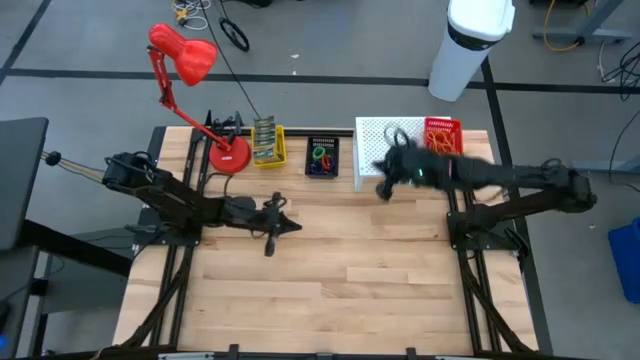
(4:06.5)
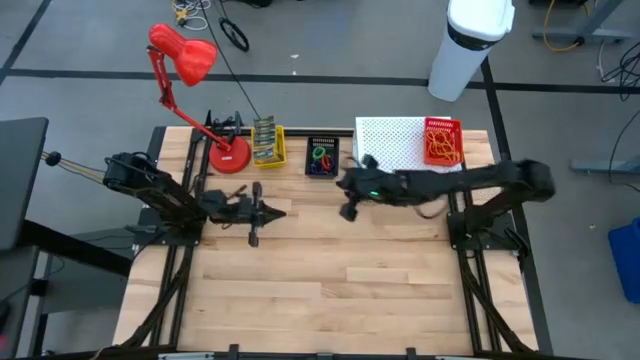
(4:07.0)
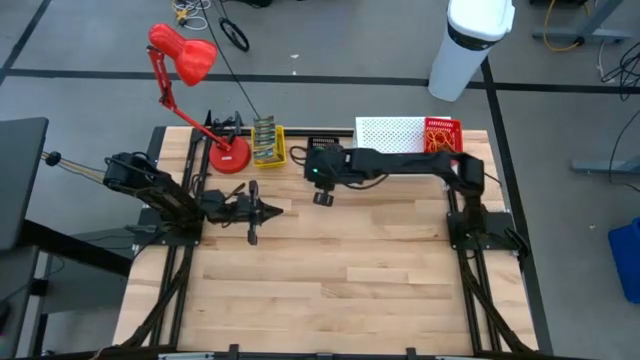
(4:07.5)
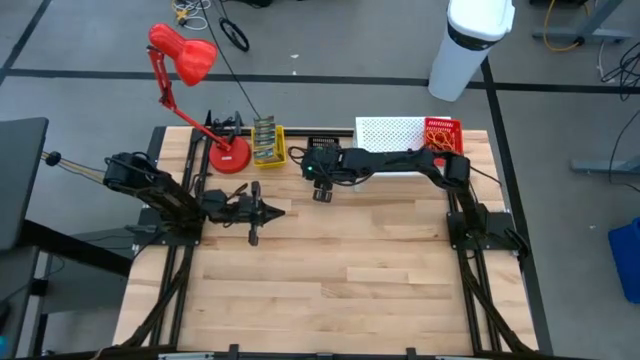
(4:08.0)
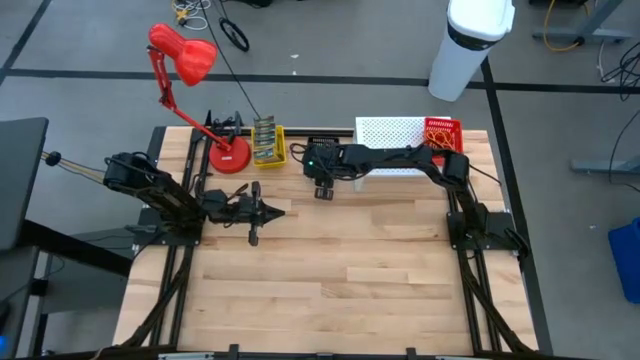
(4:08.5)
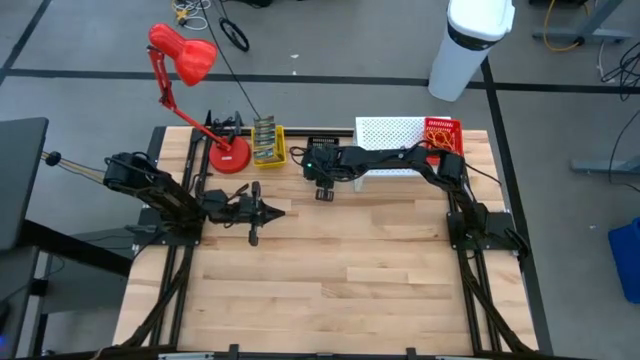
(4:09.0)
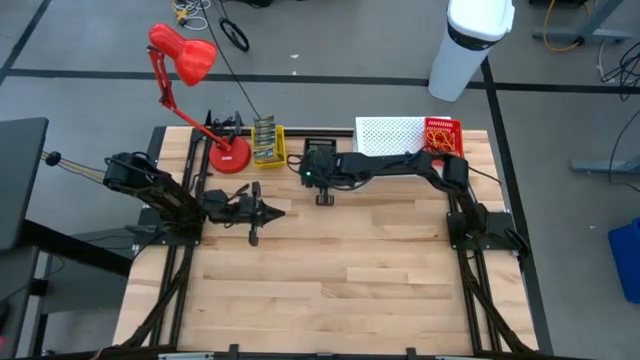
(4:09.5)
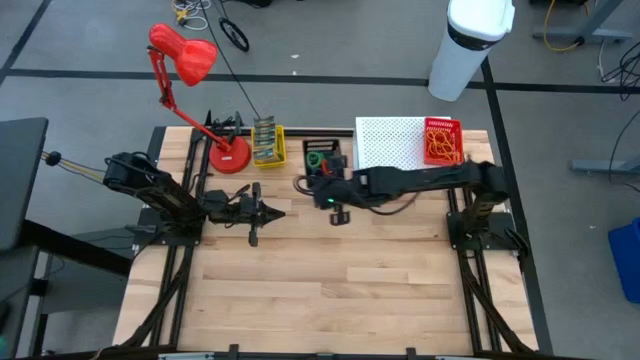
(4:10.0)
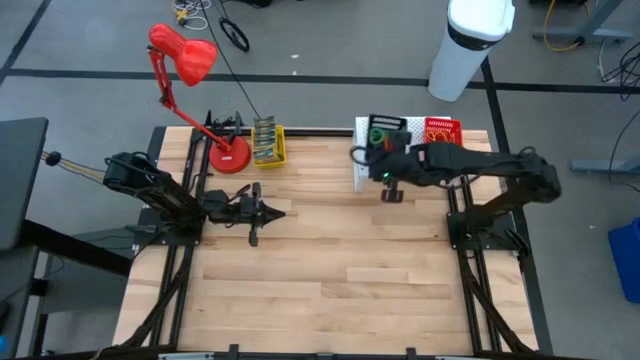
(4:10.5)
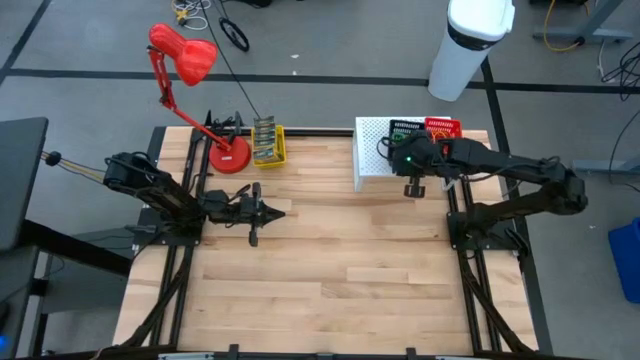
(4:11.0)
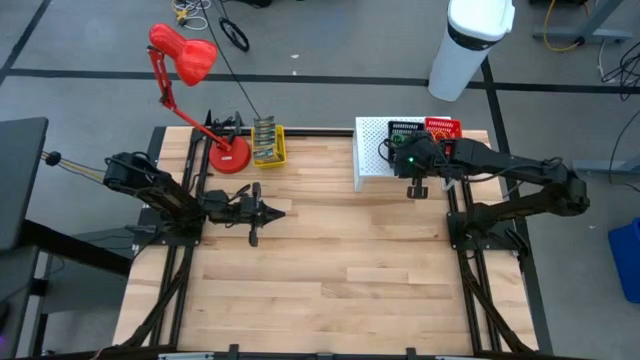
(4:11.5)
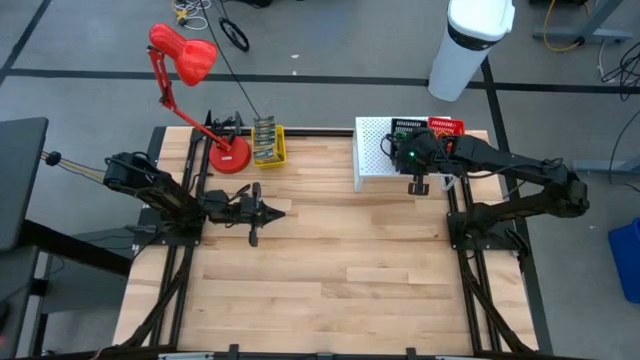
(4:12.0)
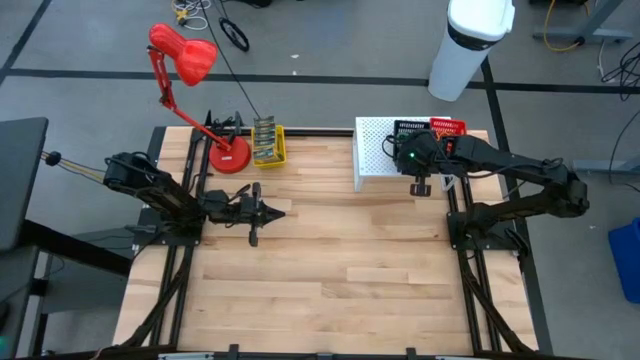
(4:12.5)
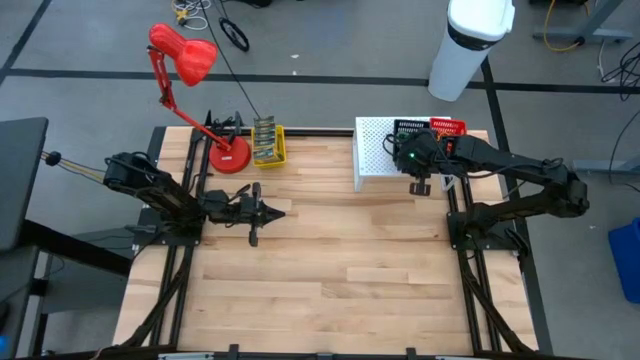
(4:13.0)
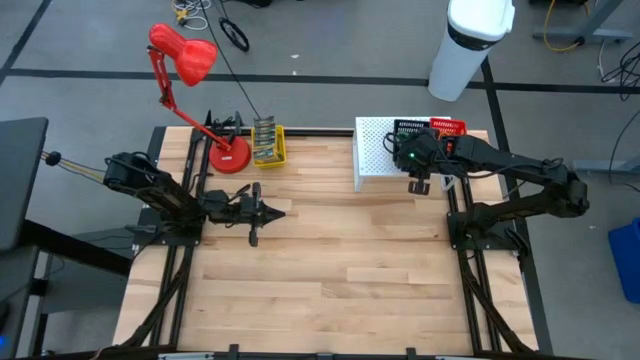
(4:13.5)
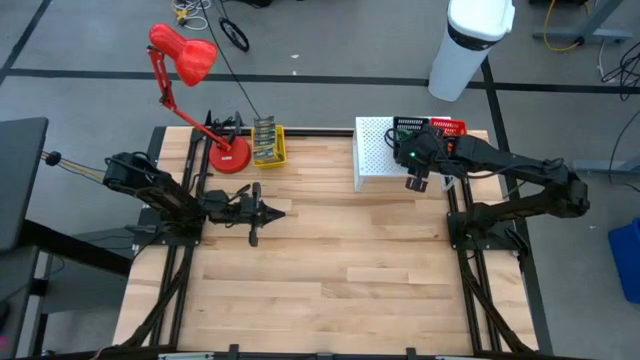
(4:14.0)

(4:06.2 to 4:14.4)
Task: Pick & Place Office Desk Supplies
Put the black bin with the spiral keychains onto the white shelf

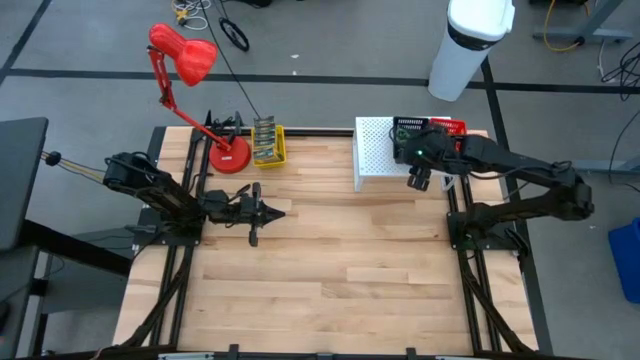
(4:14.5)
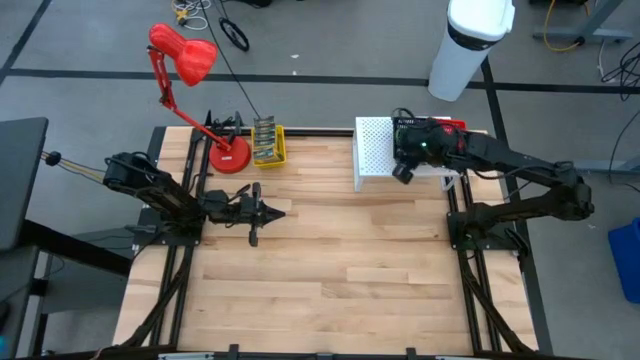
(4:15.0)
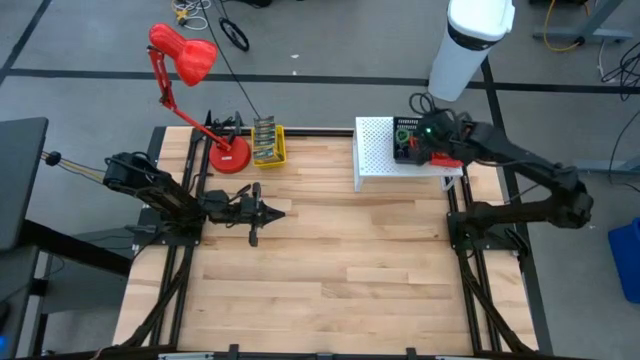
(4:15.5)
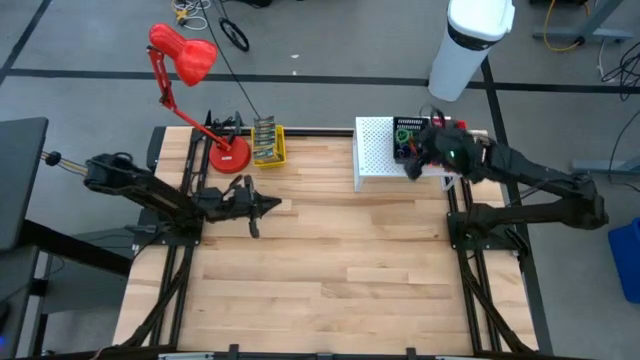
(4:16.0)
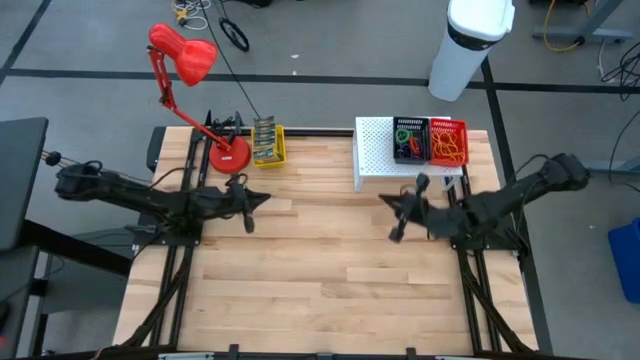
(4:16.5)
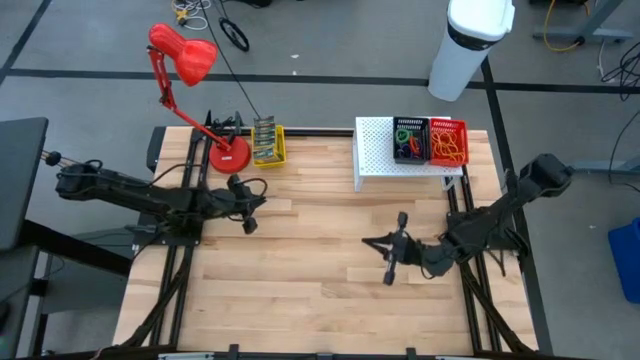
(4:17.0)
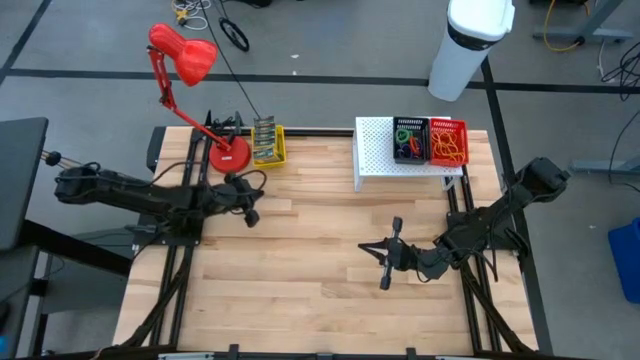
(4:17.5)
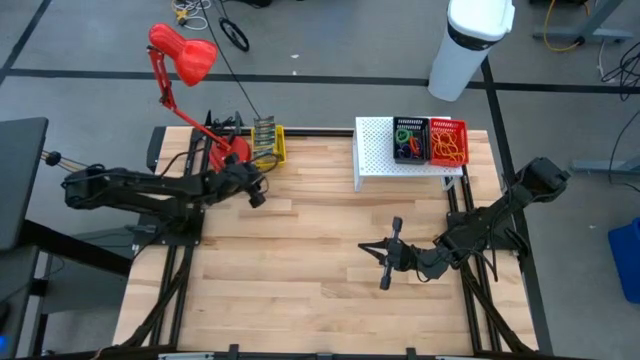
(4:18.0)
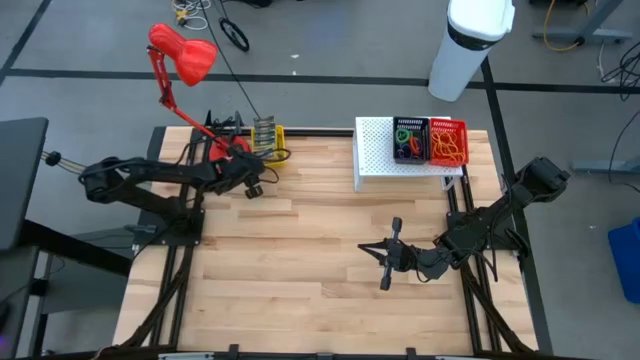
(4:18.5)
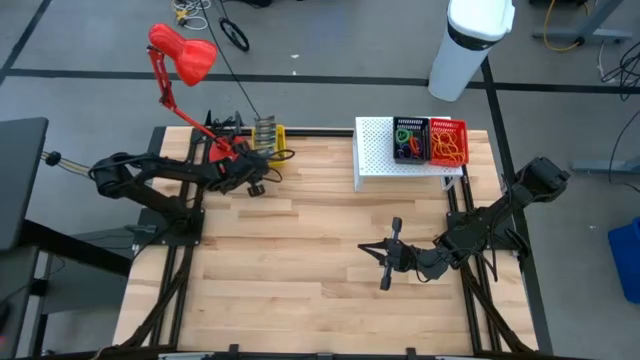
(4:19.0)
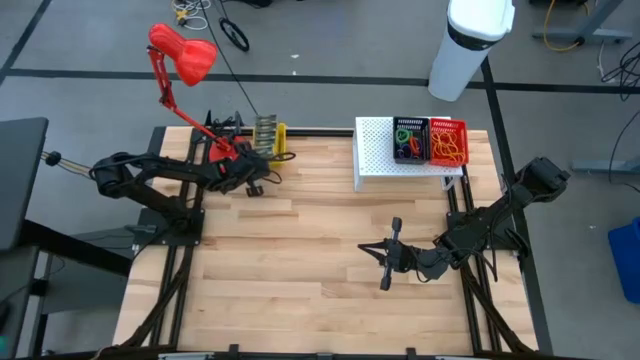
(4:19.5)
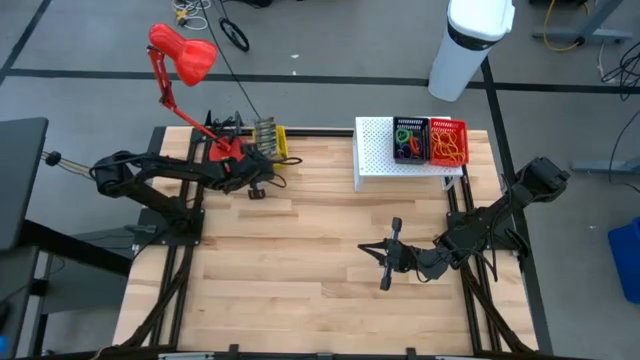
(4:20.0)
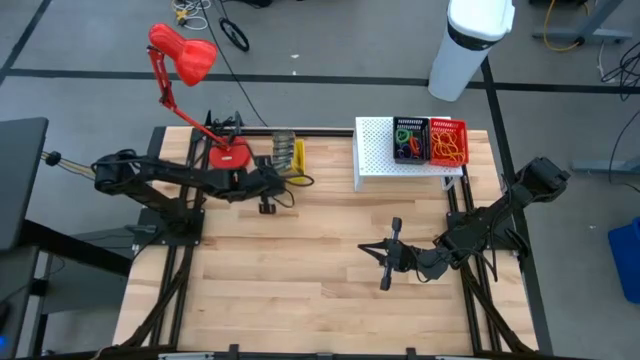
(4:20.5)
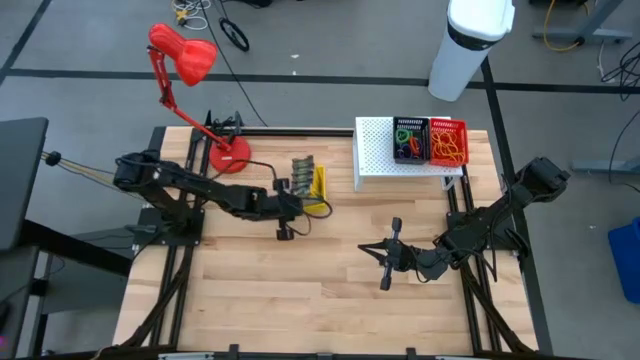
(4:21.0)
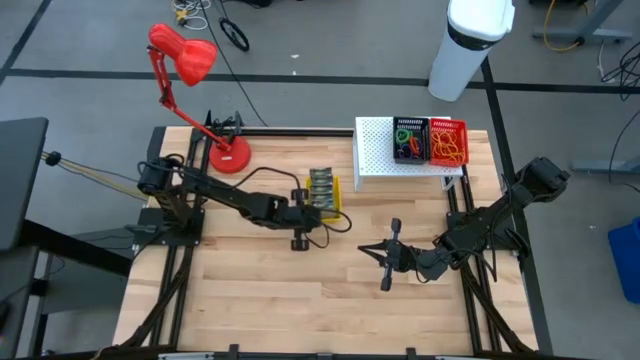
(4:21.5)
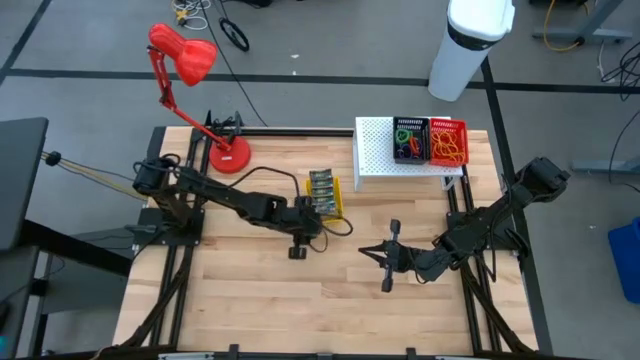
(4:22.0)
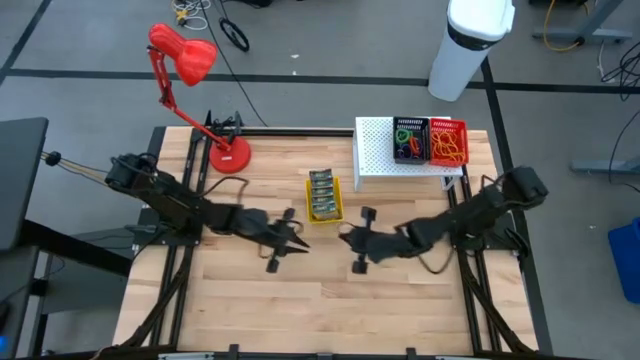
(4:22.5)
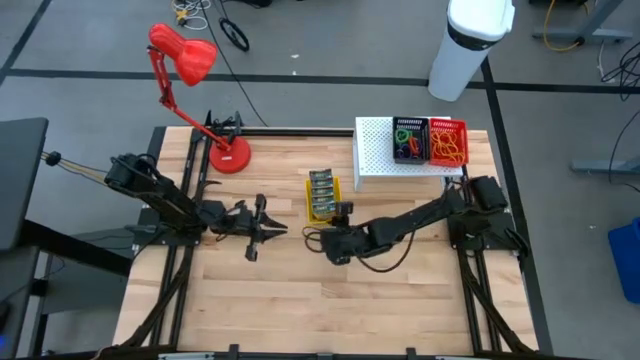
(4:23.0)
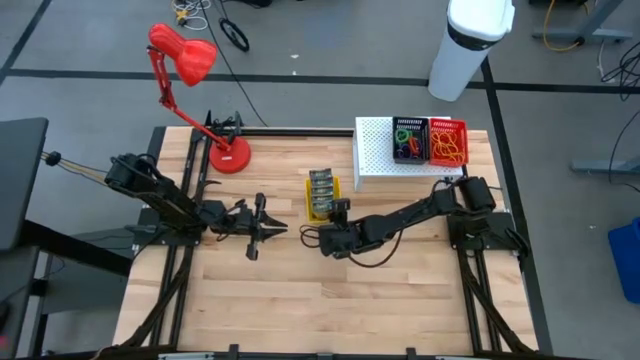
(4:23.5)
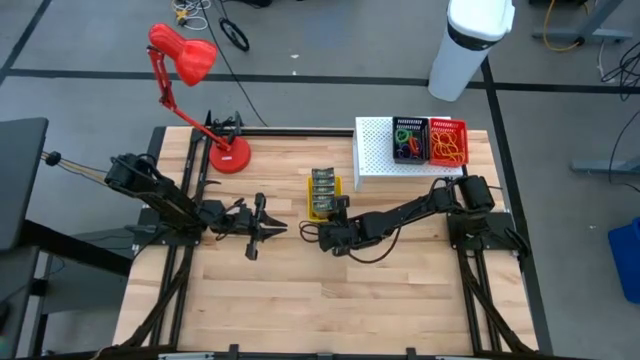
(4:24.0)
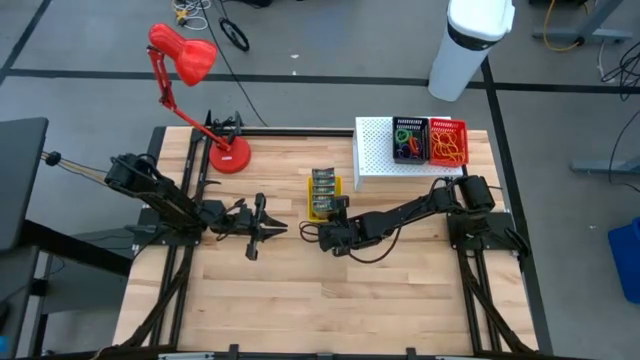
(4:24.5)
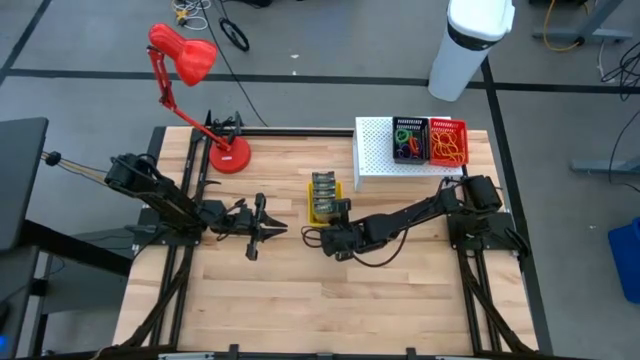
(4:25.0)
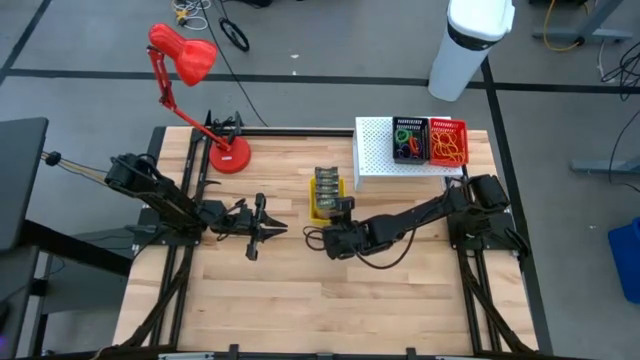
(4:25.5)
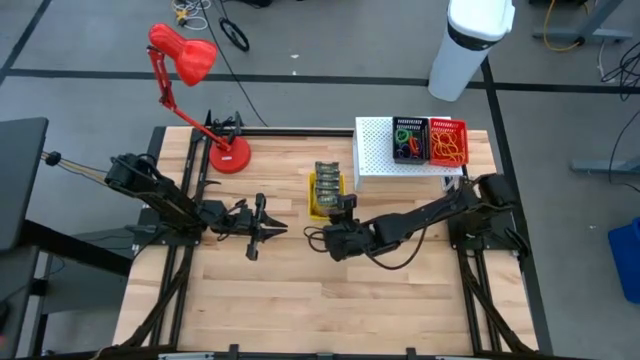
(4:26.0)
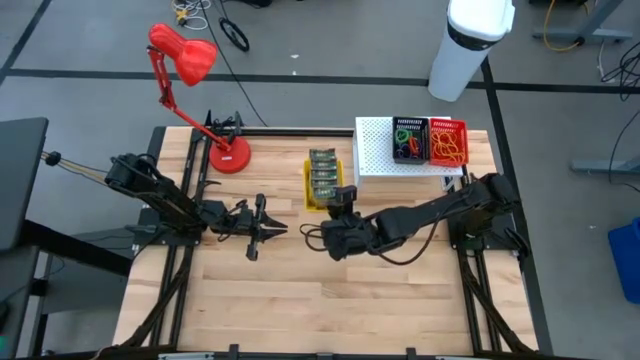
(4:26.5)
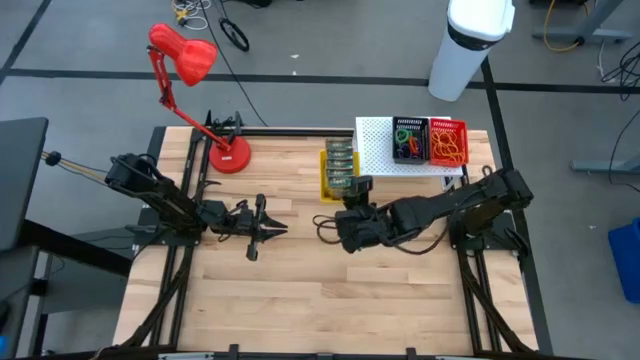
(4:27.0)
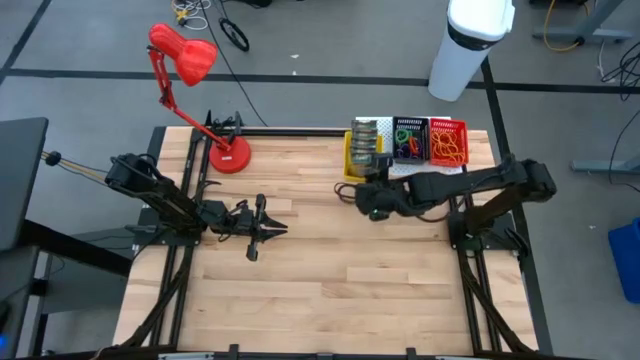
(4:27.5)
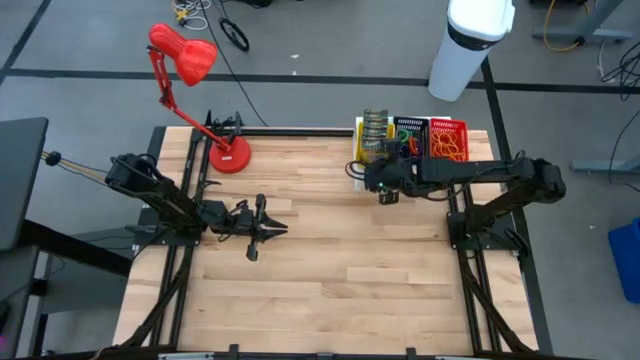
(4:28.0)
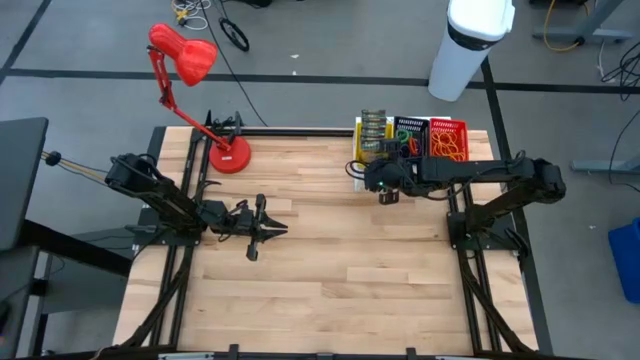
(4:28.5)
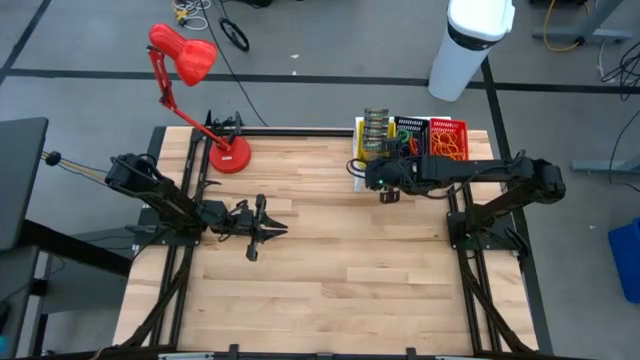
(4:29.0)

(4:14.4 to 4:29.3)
Put the yellow bin with crayon boxes onto the white shelf
